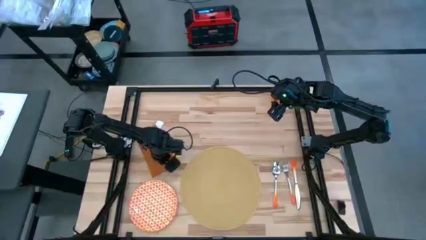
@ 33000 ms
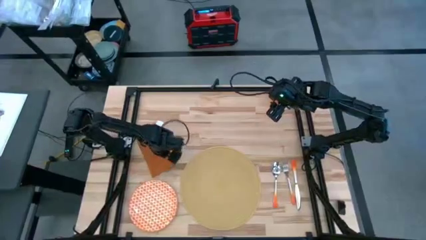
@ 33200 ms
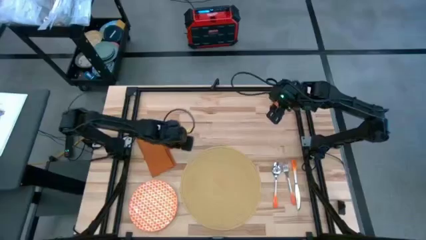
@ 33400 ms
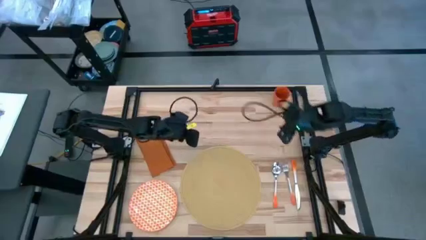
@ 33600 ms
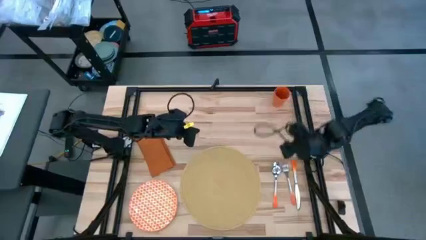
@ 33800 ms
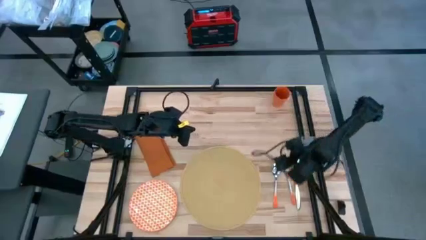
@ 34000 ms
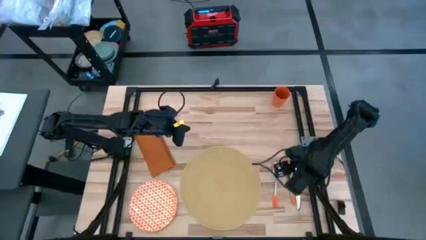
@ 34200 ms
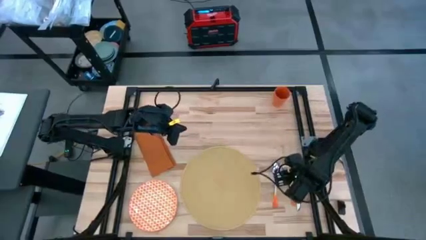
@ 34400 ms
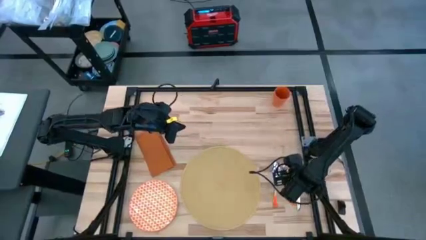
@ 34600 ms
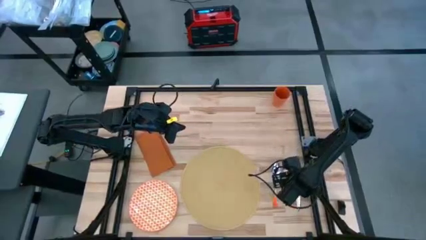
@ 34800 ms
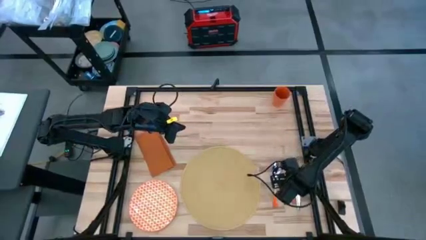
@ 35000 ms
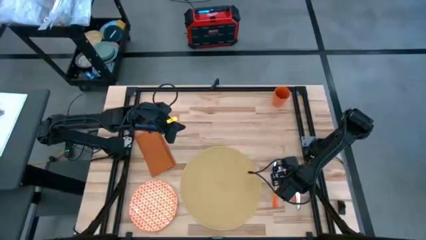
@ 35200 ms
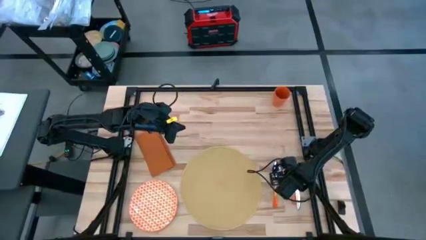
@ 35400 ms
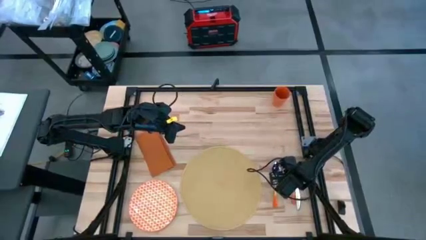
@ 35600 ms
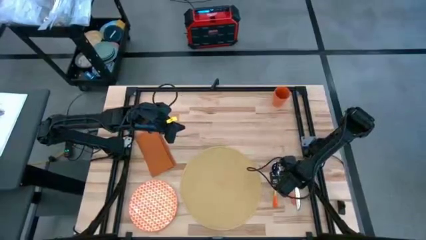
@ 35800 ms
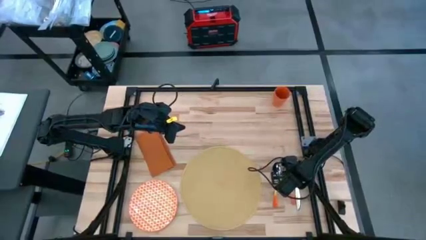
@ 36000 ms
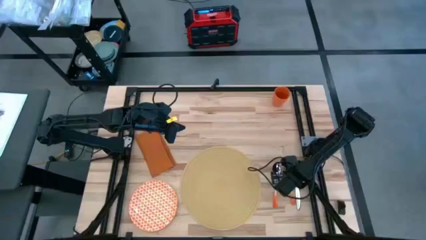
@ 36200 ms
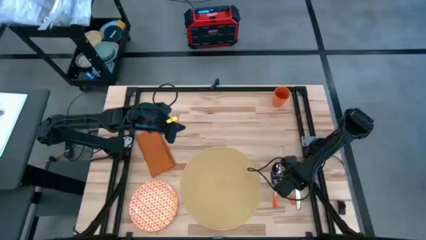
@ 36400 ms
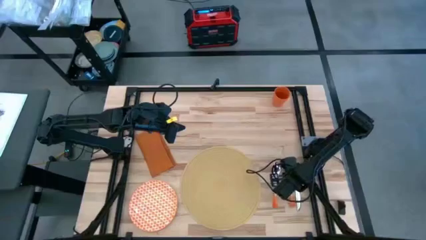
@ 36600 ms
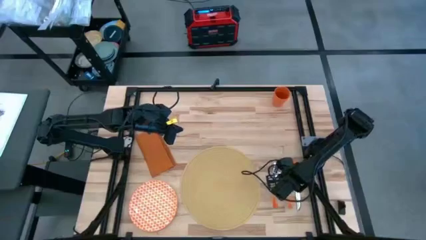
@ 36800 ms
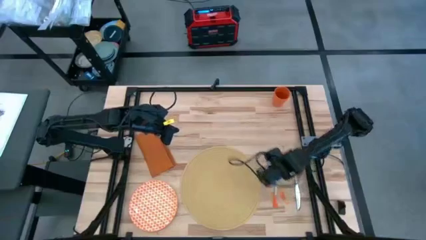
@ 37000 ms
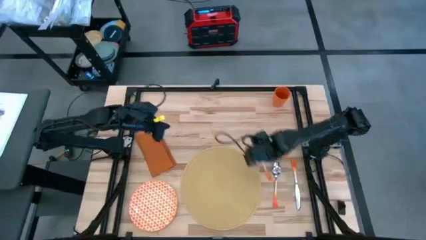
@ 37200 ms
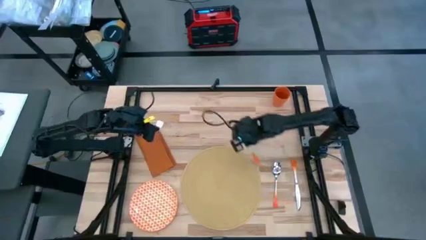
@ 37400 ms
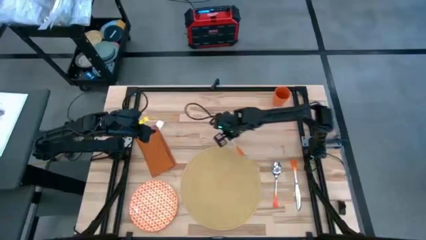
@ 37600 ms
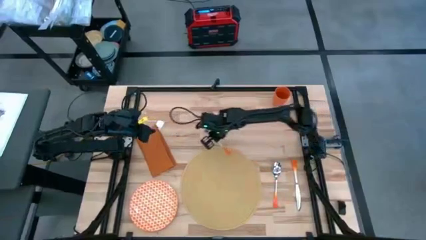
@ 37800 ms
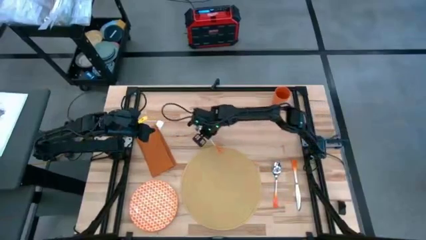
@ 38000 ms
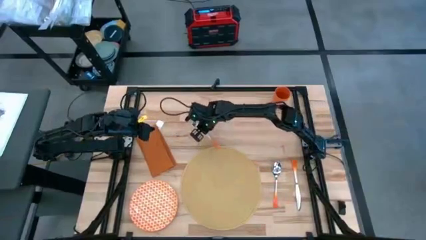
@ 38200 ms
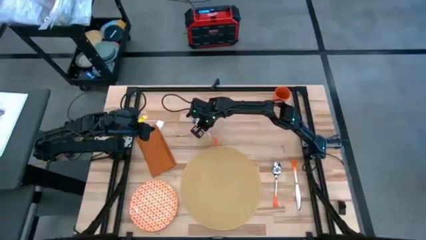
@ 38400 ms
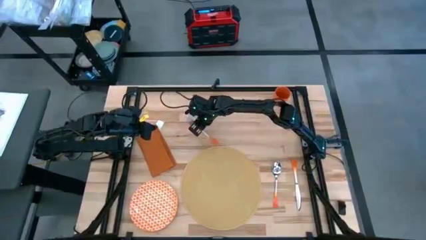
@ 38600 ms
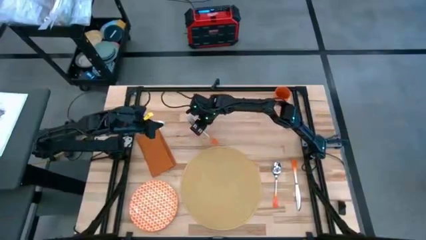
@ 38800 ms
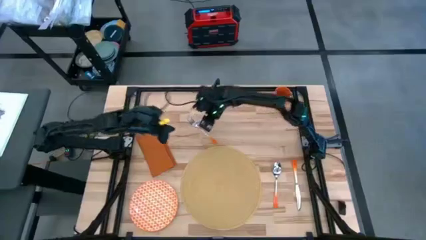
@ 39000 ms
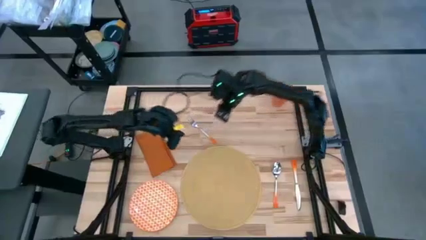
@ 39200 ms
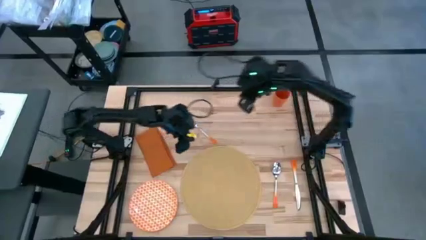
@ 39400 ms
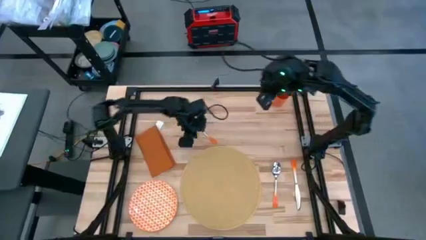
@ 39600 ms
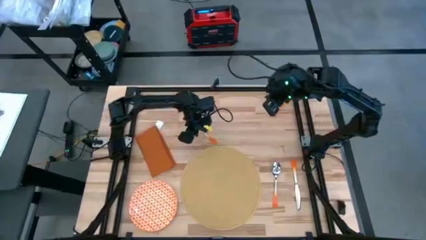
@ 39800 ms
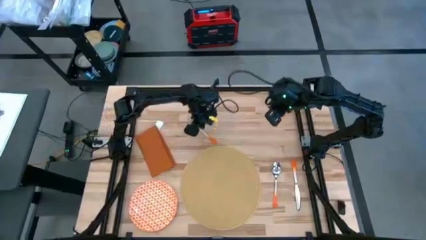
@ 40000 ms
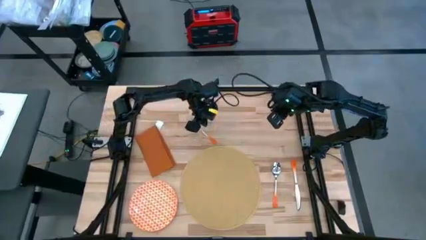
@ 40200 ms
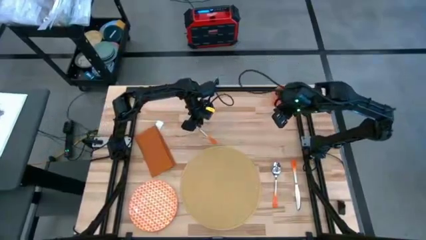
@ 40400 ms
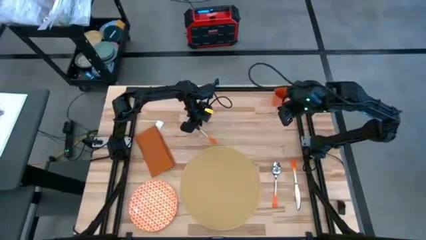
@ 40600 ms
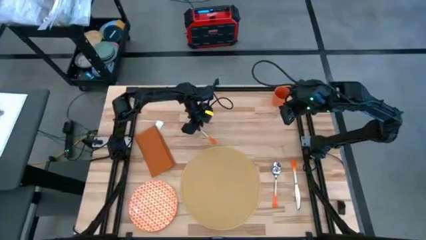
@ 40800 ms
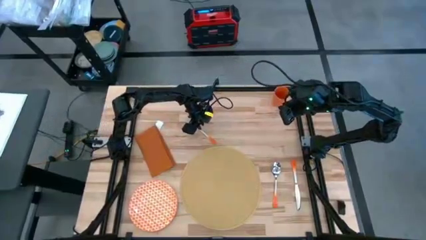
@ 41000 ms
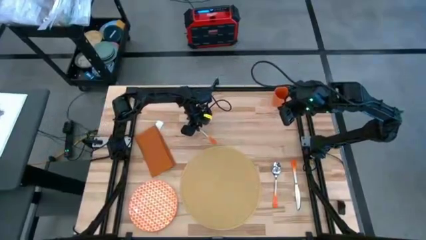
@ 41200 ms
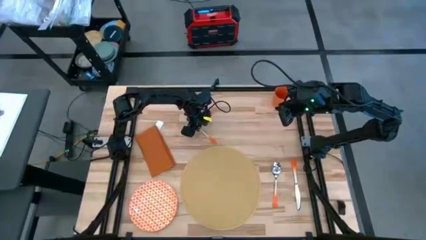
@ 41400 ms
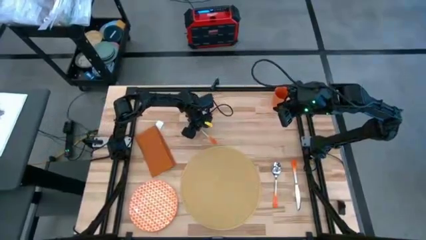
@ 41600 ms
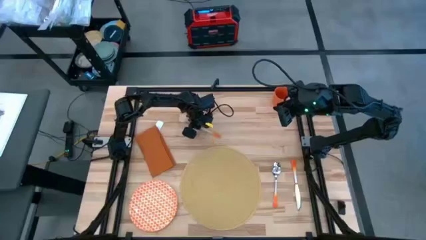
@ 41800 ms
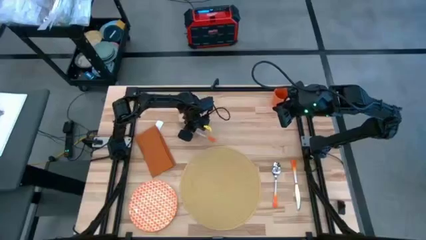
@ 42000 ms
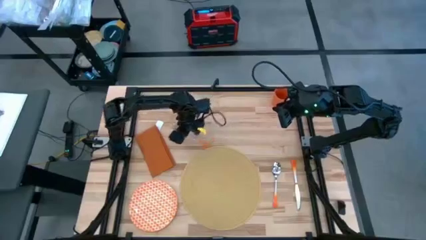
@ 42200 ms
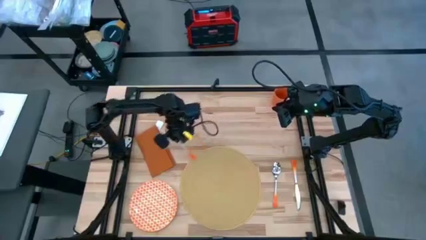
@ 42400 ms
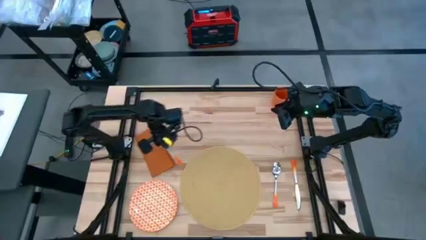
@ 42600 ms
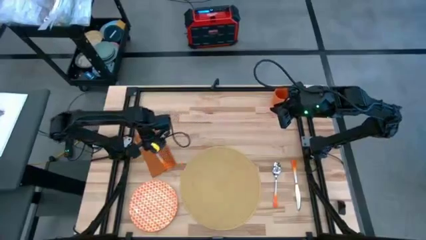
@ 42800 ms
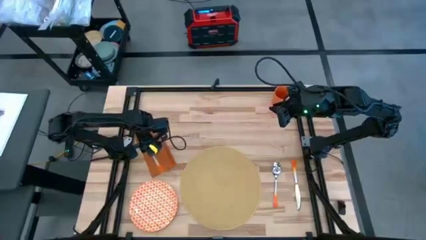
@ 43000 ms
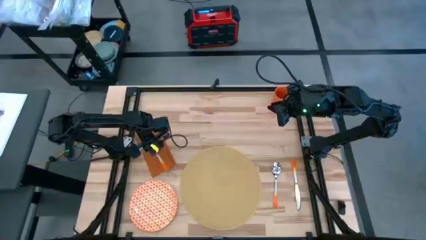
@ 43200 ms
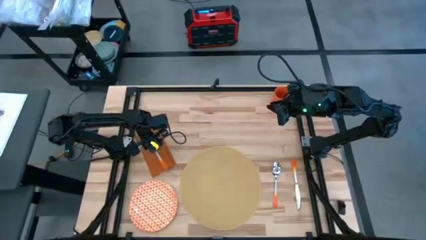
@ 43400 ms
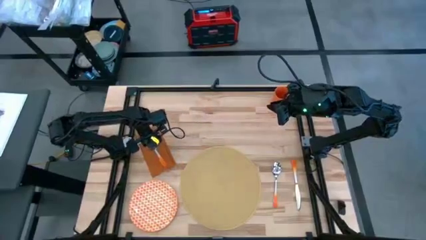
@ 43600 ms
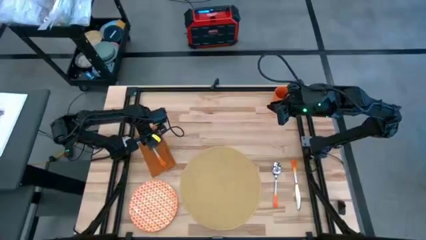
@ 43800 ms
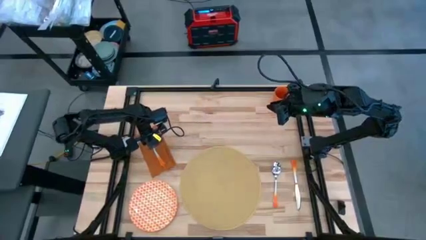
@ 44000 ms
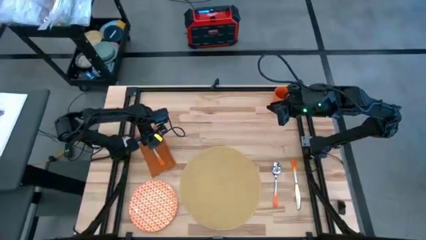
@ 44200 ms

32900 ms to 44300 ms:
Task: Set table place
Put the fork on the orange table napkin
